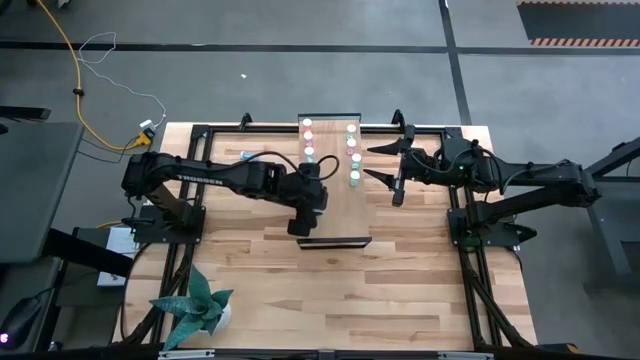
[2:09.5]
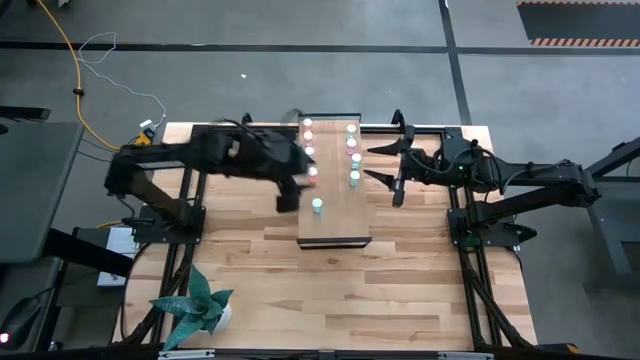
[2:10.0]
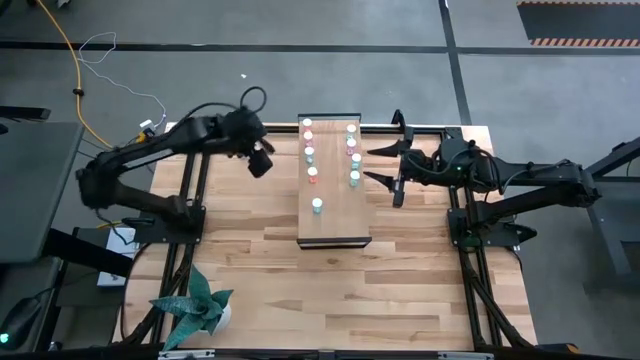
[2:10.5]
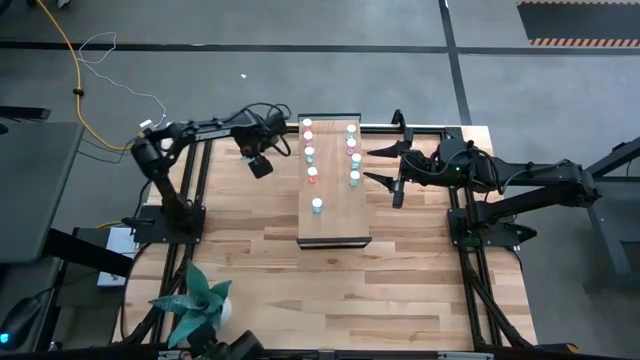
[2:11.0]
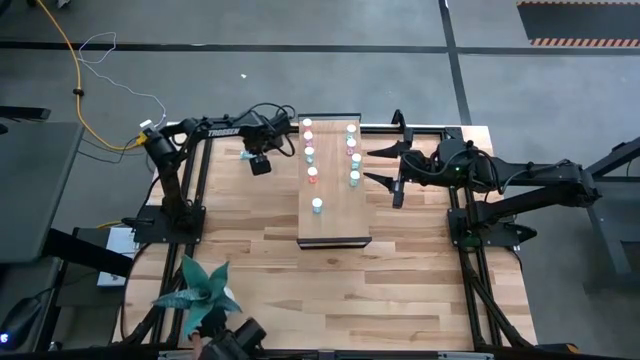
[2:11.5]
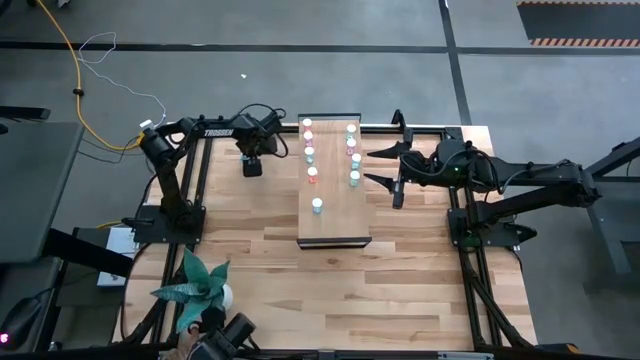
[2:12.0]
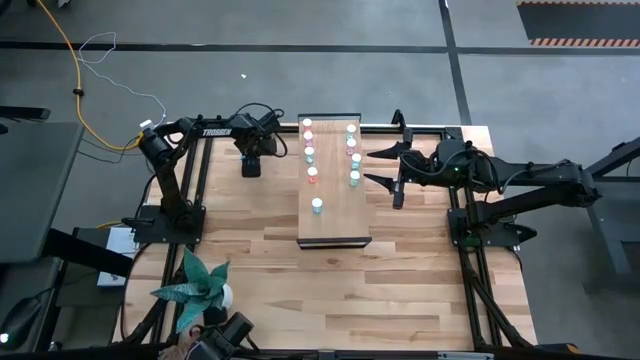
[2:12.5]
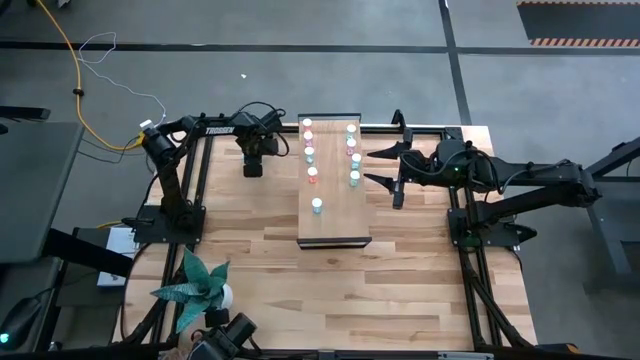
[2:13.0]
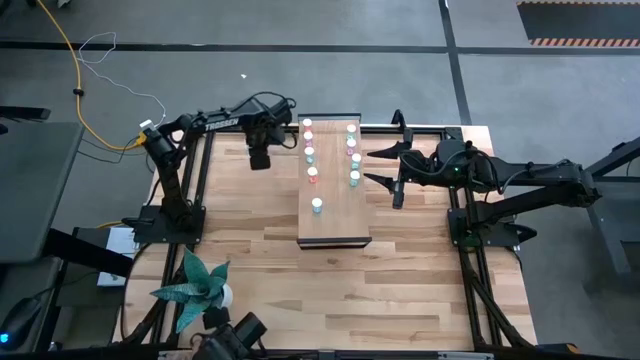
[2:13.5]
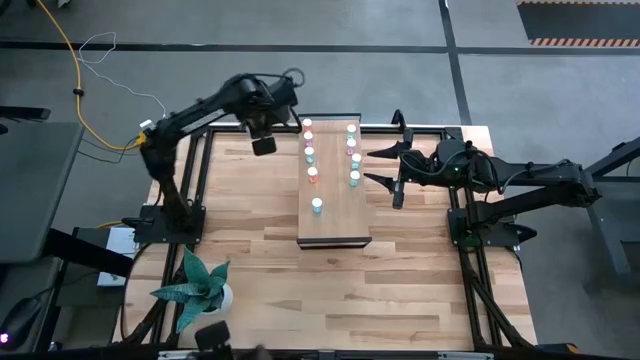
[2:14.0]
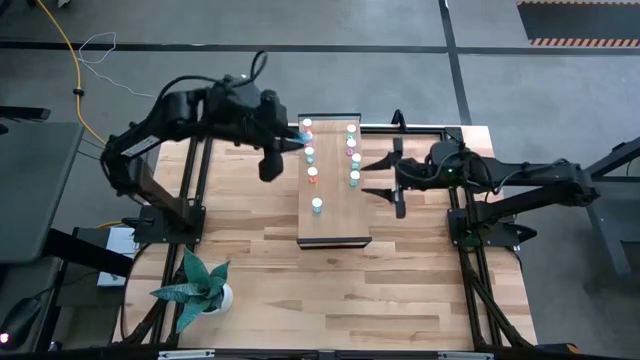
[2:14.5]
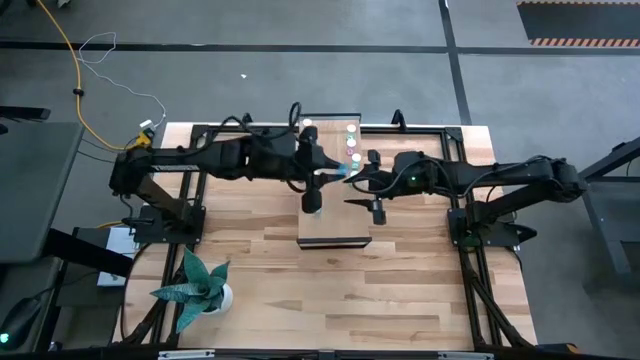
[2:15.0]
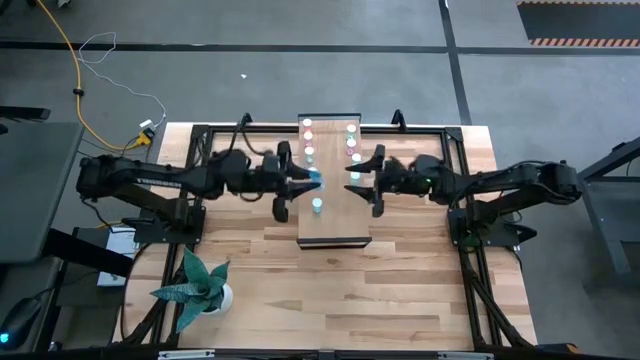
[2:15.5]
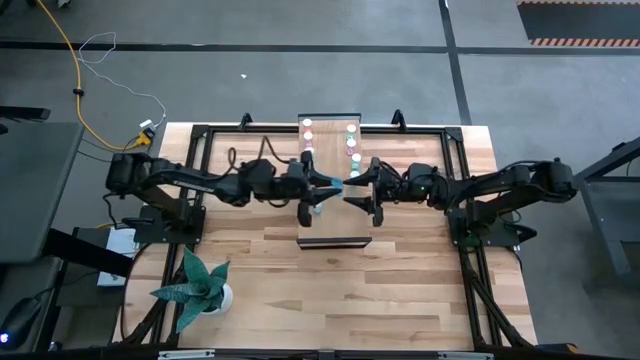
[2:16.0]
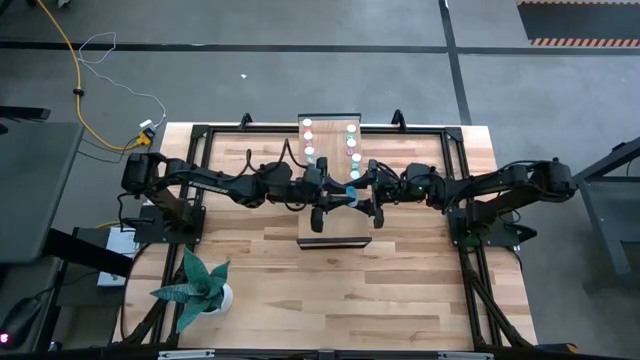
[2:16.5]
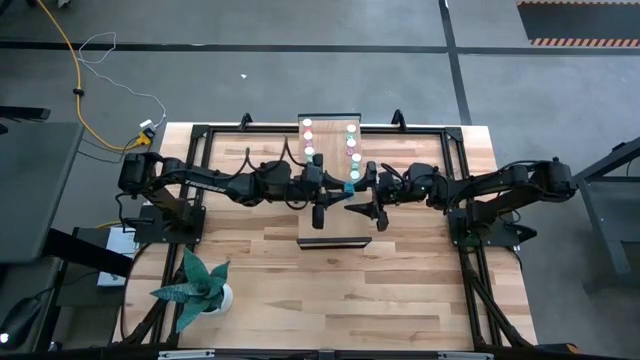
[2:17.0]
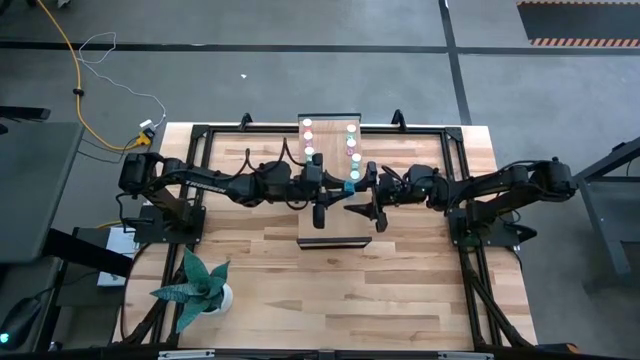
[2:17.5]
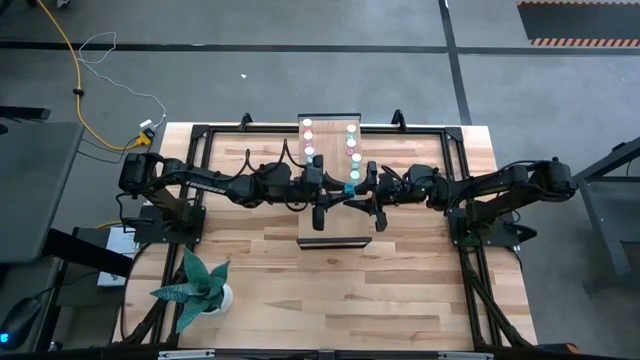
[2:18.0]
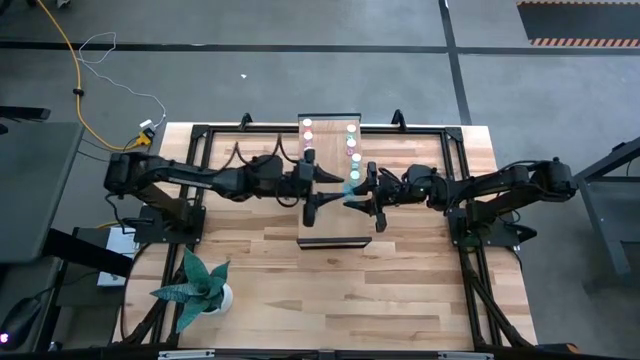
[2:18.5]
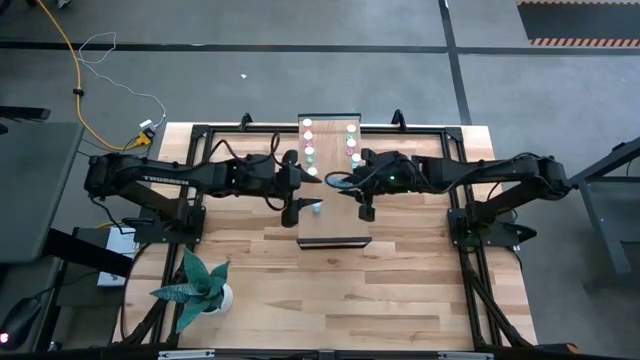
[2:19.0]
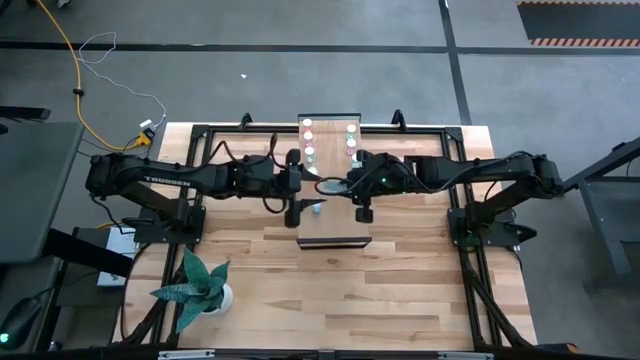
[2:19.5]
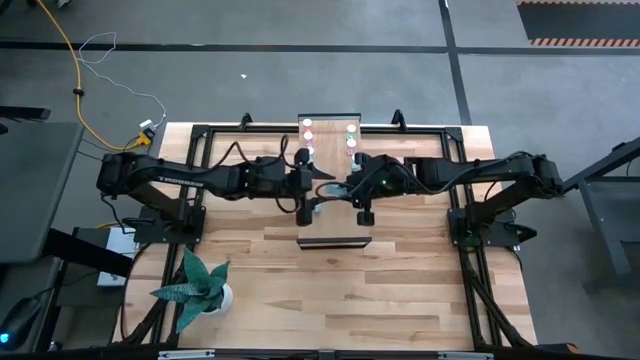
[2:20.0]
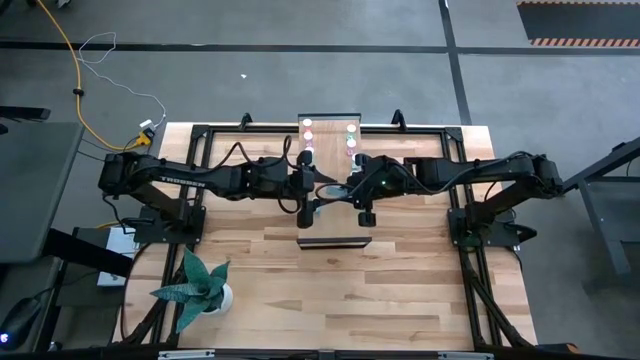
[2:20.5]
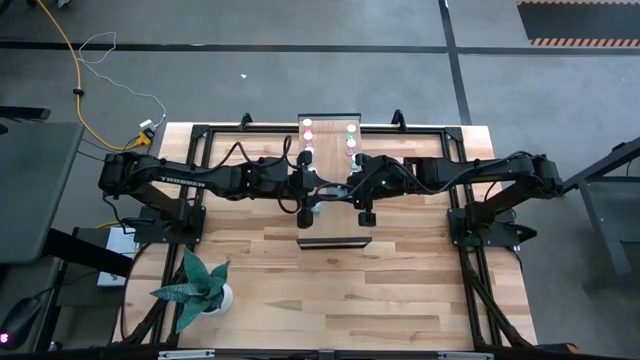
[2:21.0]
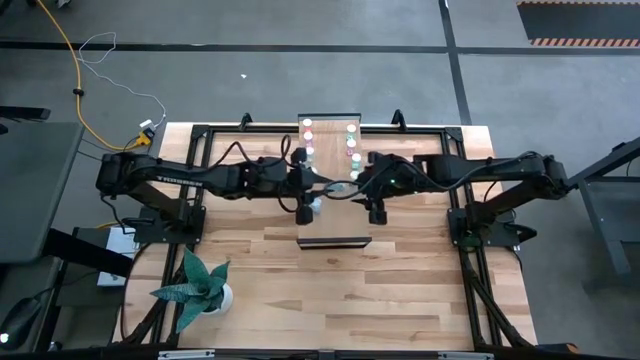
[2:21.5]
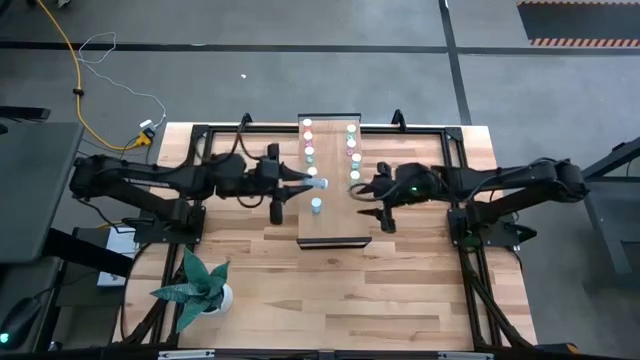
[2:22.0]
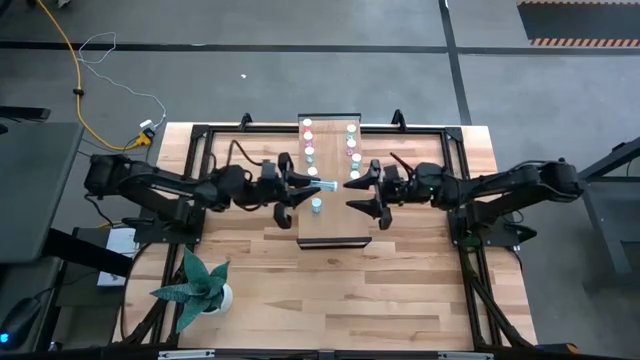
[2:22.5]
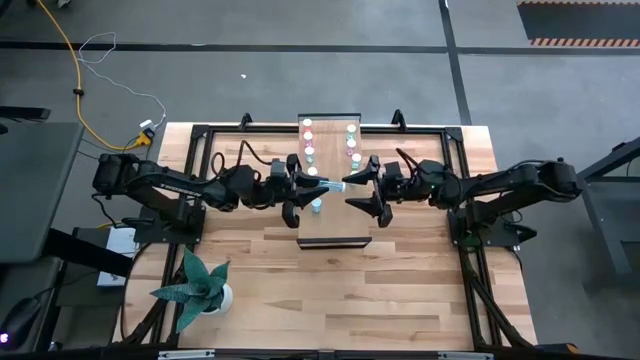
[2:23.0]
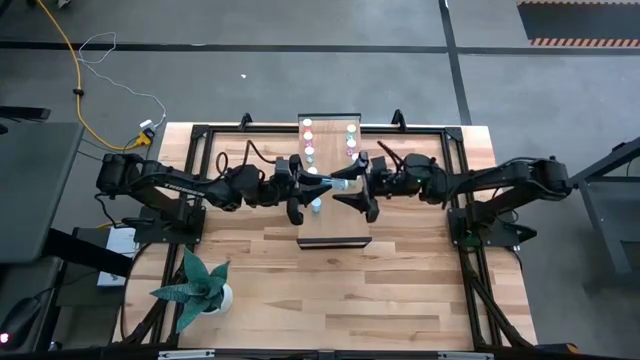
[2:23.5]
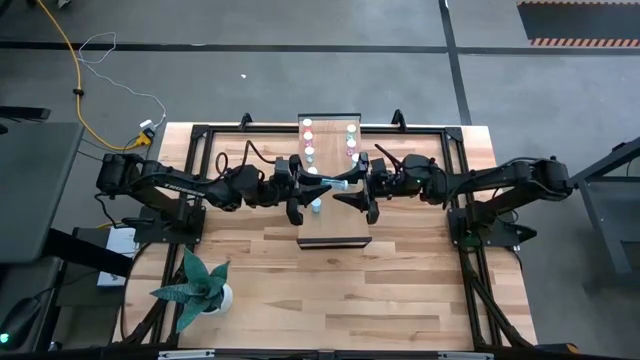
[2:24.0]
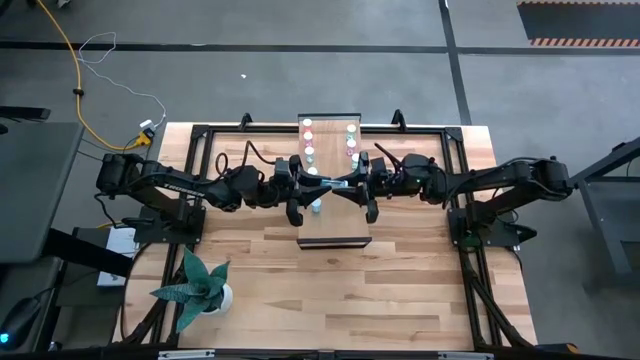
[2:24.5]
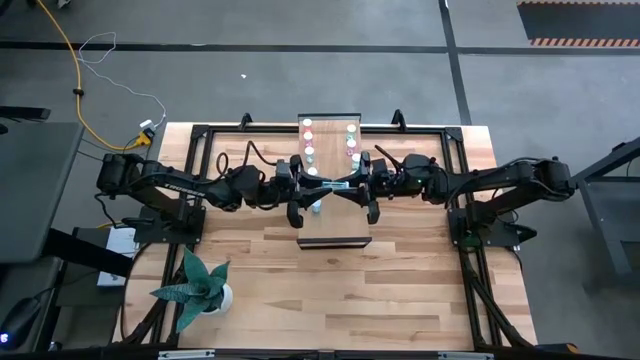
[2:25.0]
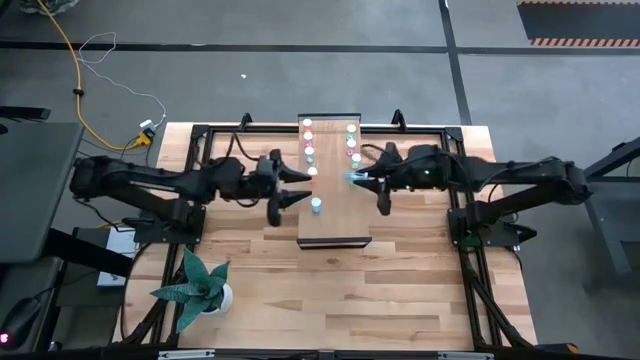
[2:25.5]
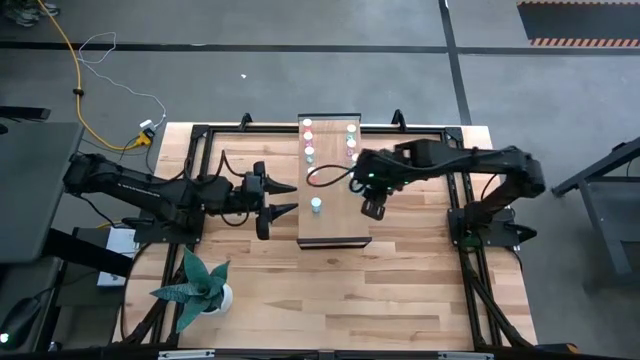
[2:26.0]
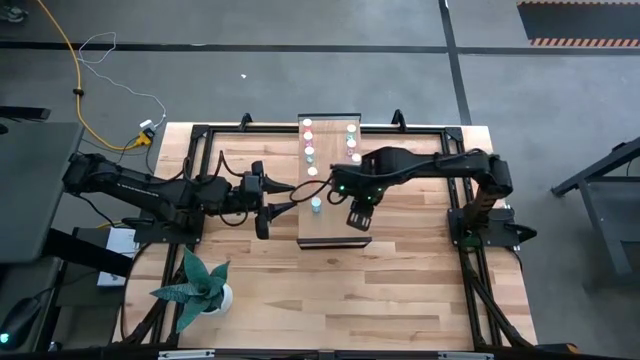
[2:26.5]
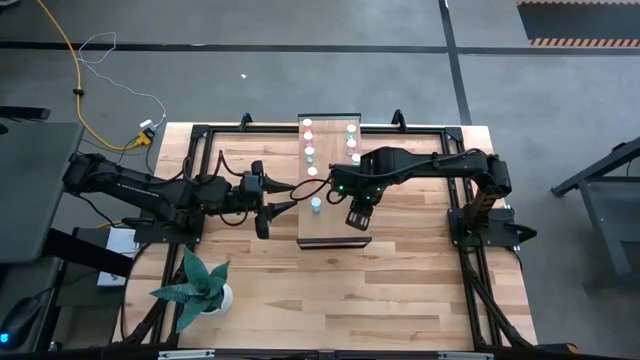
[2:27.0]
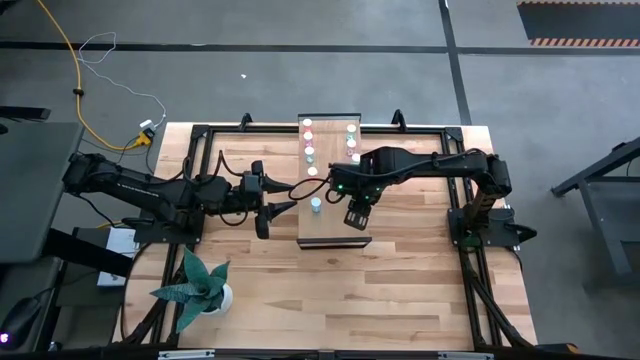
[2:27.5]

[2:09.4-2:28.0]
Task: Pick and place medicine bottles onto shelf by color
Put the transparent blue pill bottle on the shelf

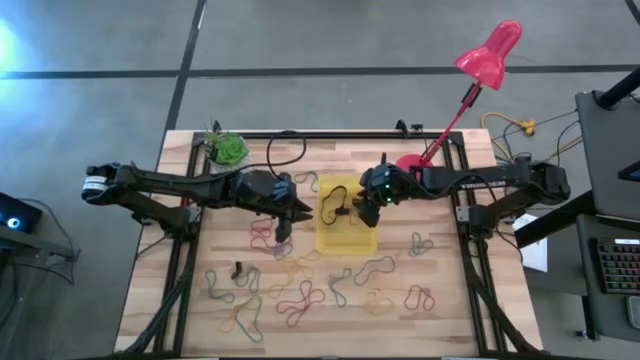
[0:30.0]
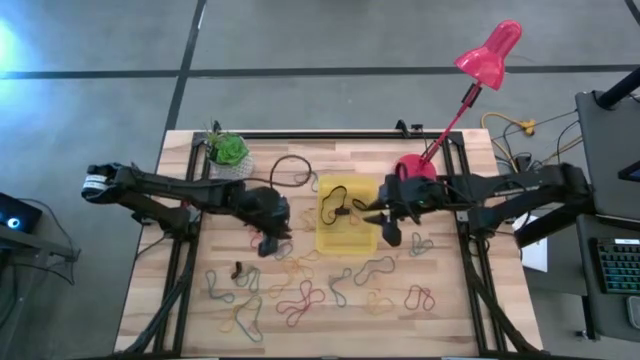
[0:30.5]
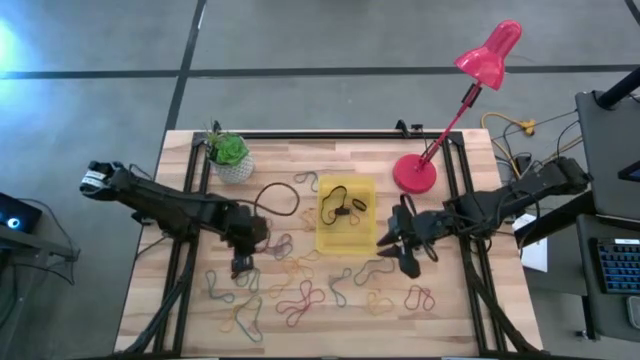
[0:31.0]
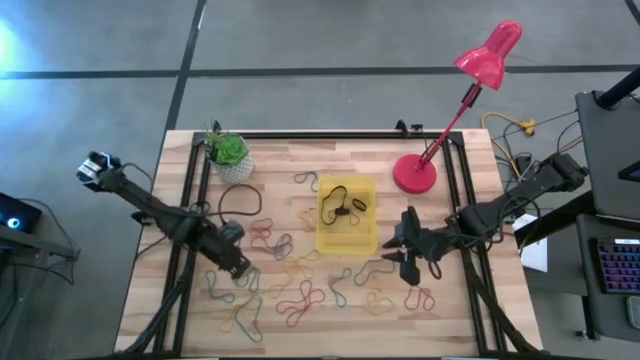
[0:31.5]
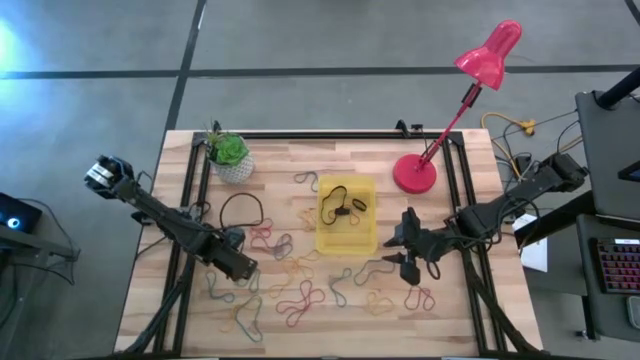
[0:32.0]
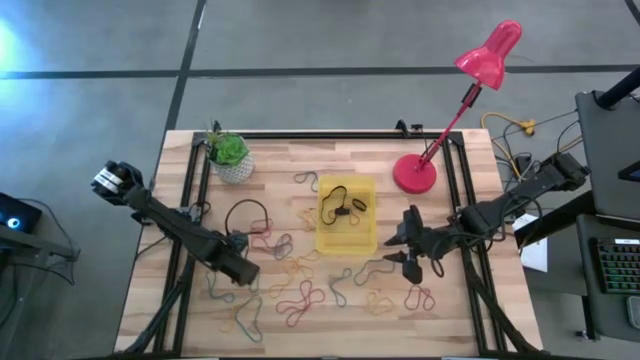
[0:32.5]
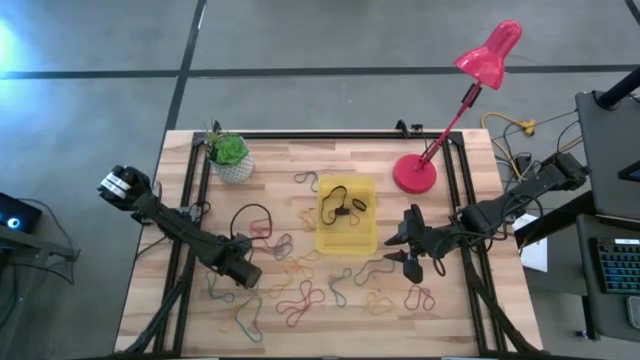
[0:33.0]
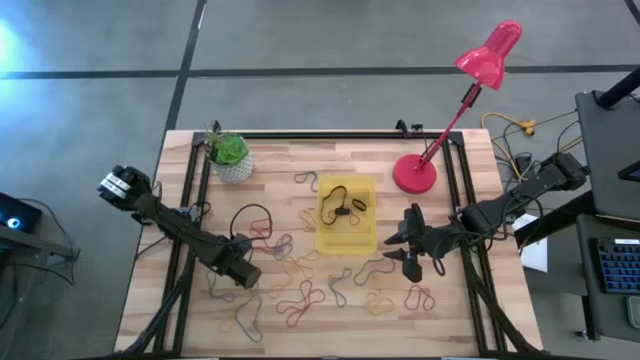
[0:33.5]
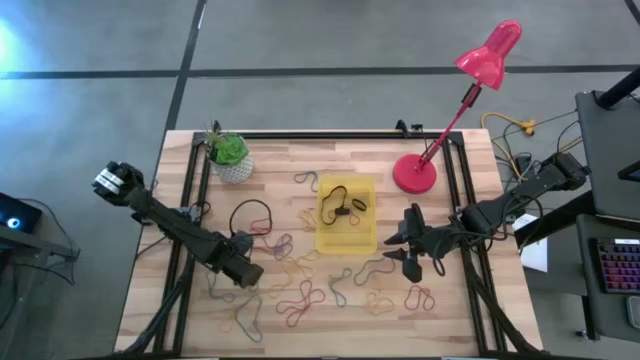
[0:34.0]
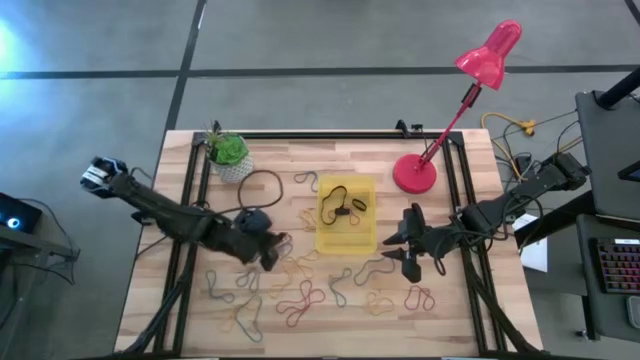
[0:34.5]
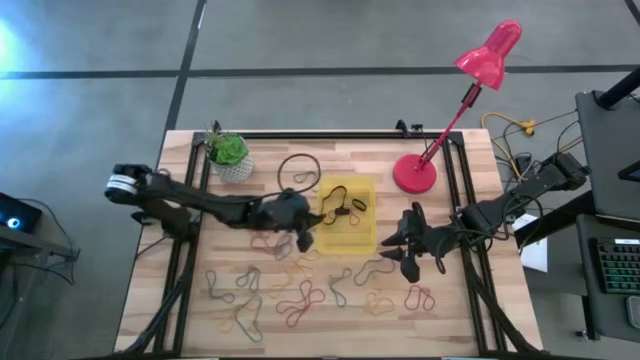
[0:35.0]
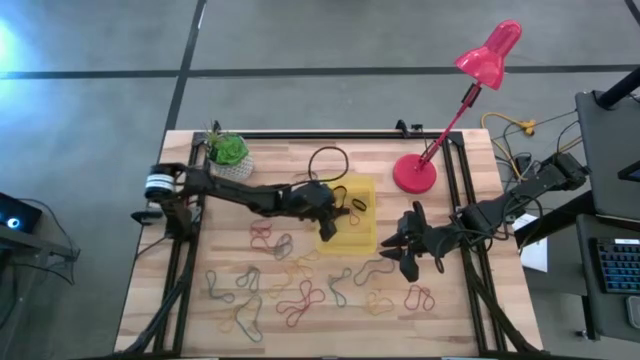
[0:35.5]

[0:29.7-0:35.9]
Task: Pick and place rubber bands into bin
Put the black rubber band into the bin
